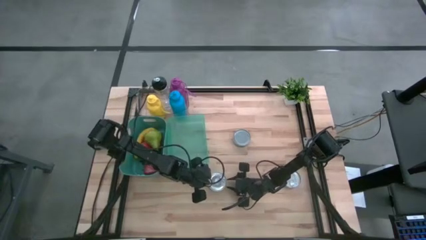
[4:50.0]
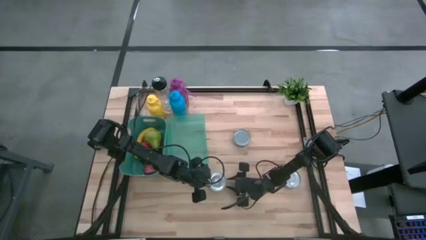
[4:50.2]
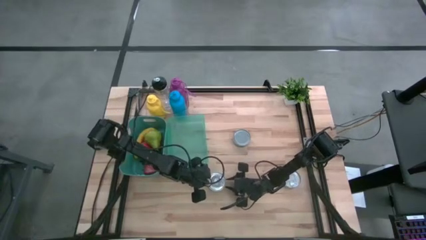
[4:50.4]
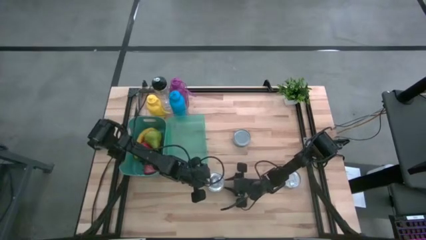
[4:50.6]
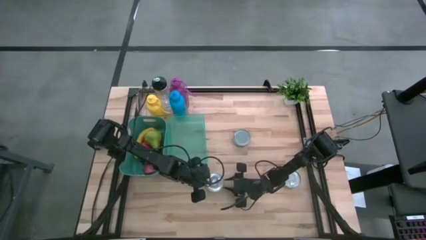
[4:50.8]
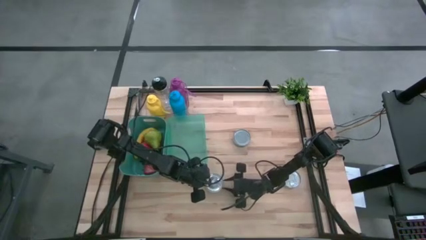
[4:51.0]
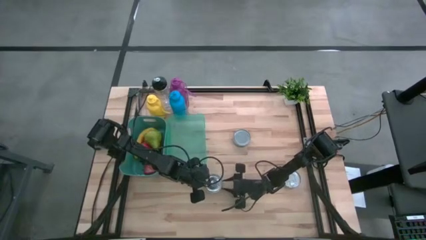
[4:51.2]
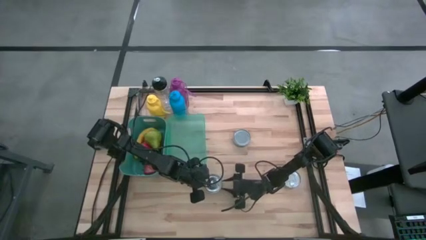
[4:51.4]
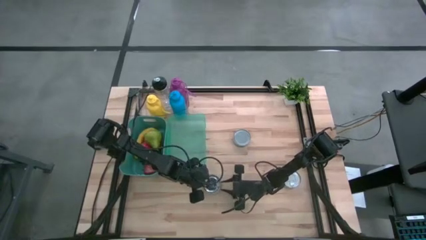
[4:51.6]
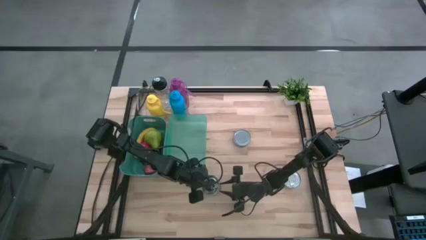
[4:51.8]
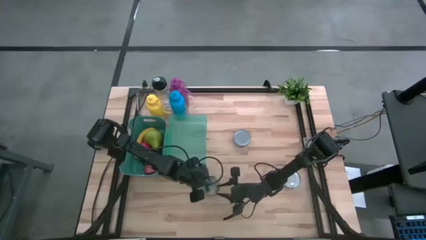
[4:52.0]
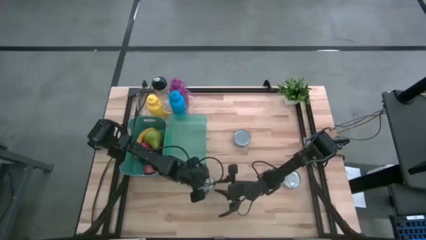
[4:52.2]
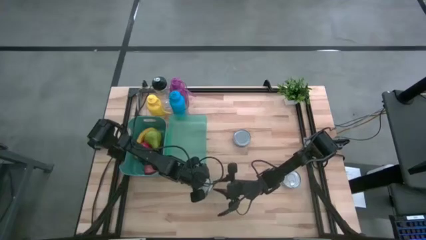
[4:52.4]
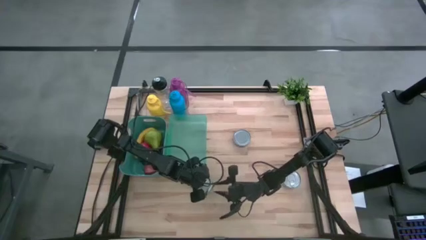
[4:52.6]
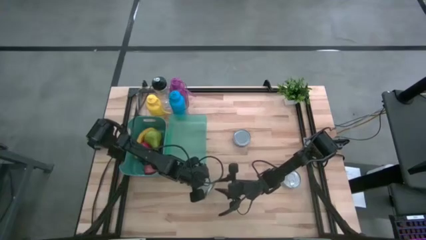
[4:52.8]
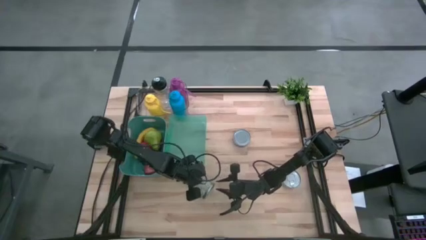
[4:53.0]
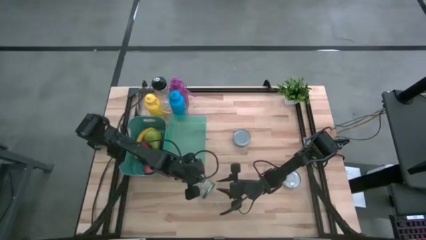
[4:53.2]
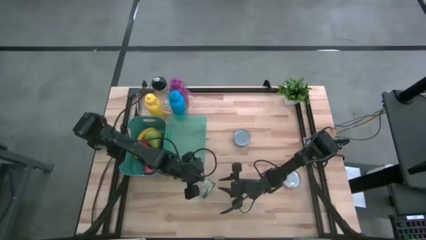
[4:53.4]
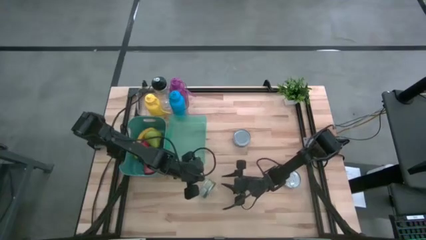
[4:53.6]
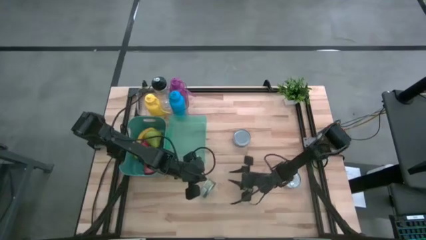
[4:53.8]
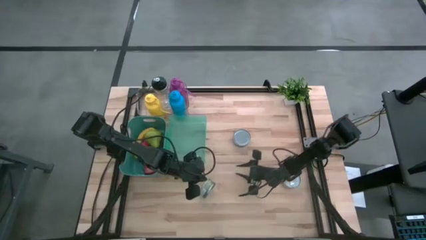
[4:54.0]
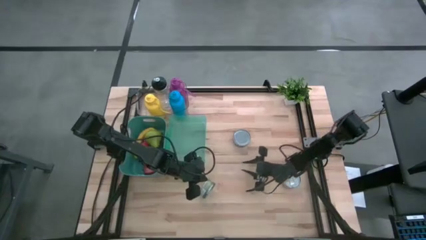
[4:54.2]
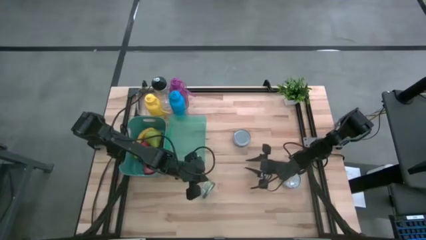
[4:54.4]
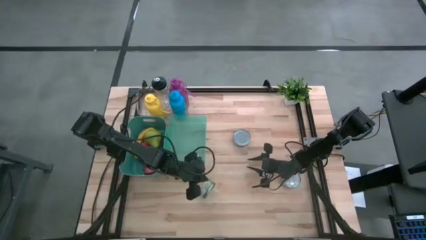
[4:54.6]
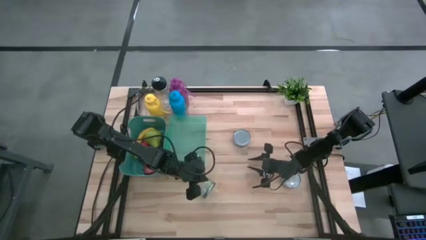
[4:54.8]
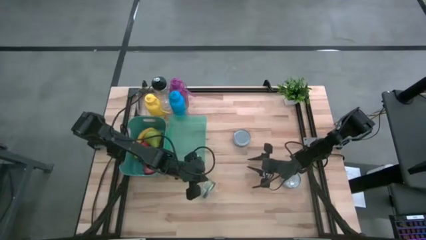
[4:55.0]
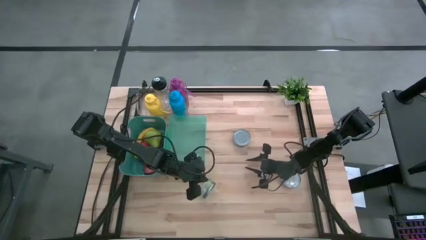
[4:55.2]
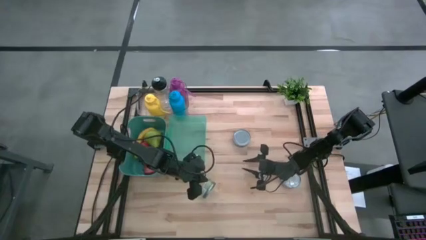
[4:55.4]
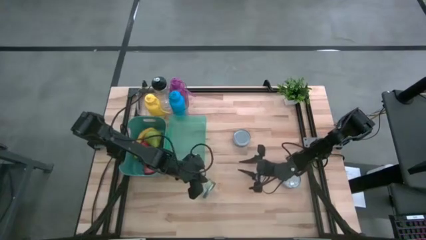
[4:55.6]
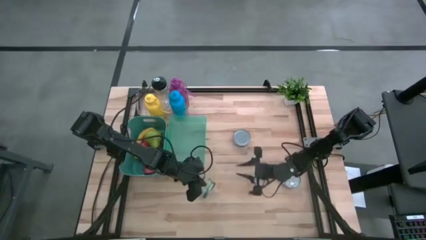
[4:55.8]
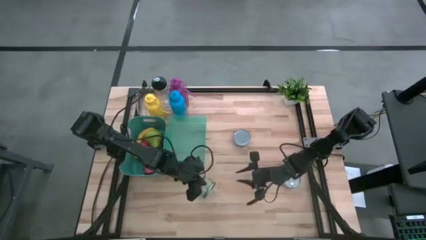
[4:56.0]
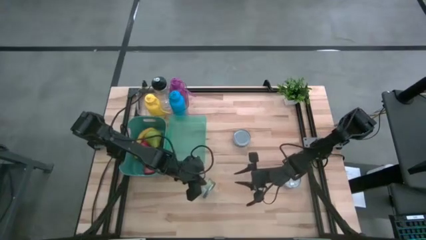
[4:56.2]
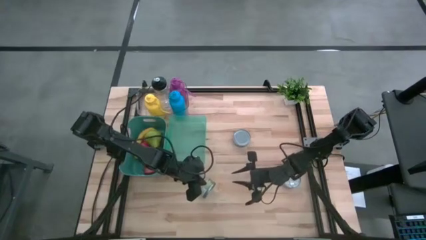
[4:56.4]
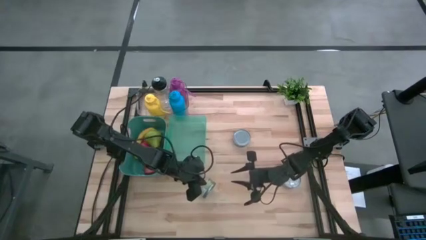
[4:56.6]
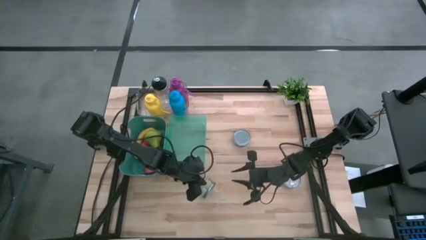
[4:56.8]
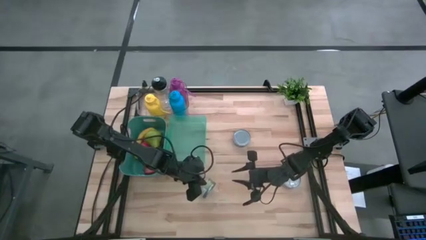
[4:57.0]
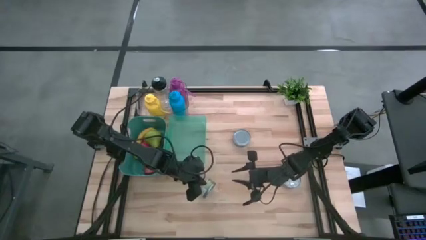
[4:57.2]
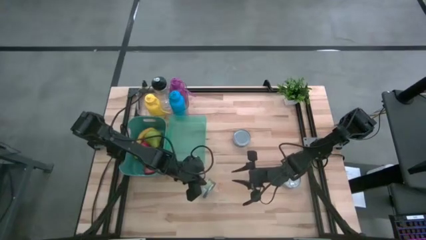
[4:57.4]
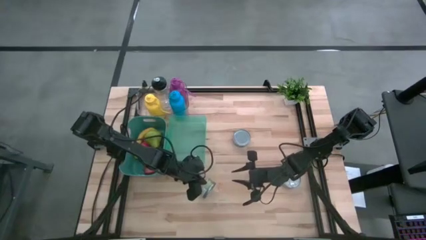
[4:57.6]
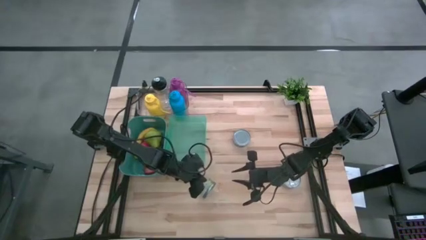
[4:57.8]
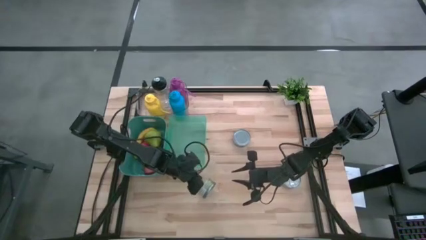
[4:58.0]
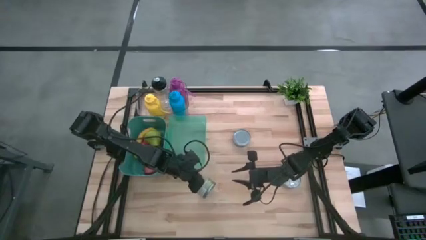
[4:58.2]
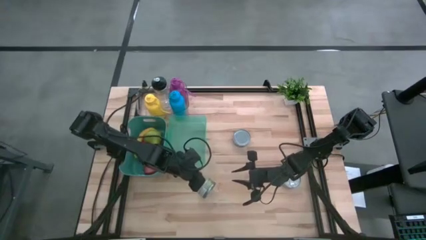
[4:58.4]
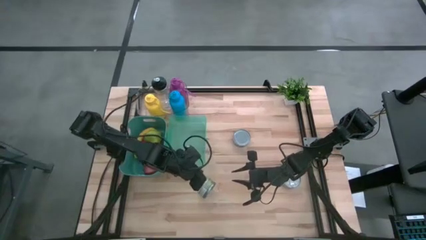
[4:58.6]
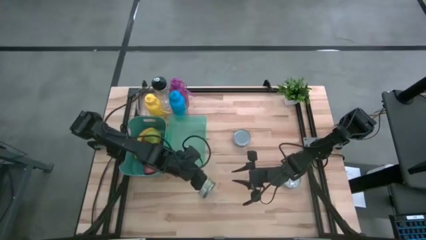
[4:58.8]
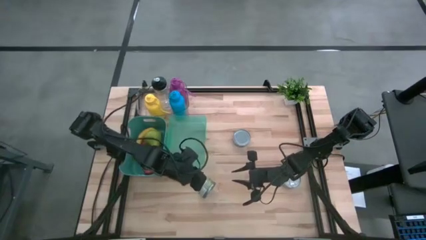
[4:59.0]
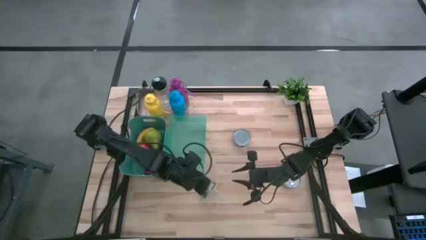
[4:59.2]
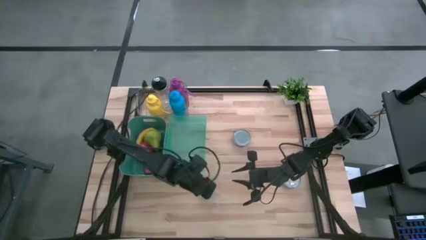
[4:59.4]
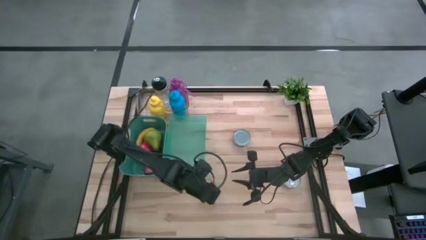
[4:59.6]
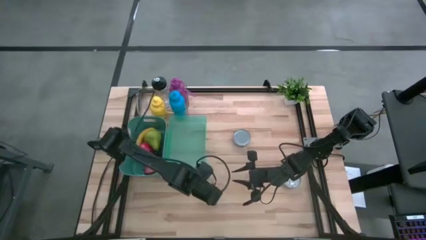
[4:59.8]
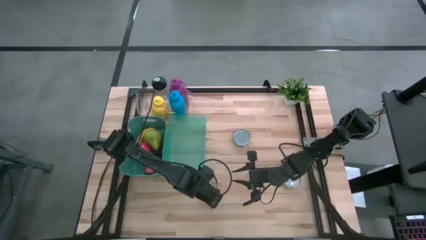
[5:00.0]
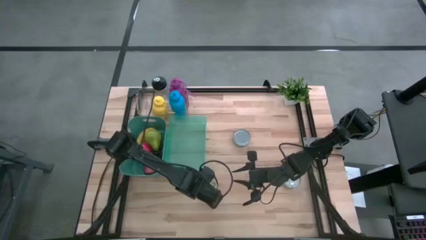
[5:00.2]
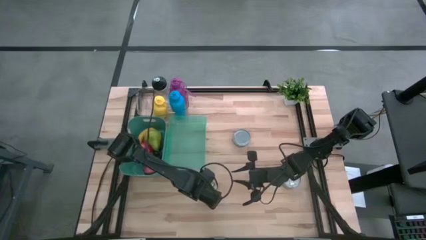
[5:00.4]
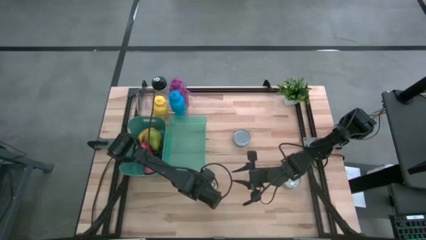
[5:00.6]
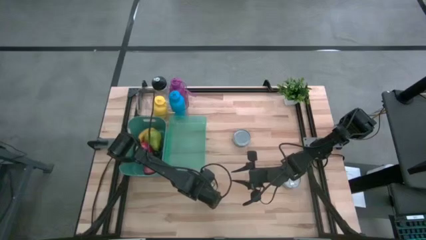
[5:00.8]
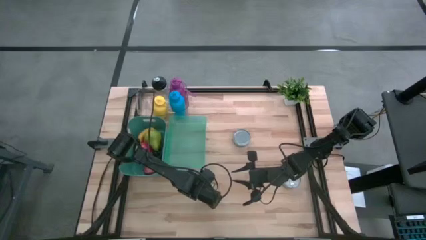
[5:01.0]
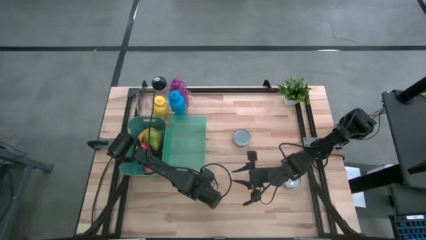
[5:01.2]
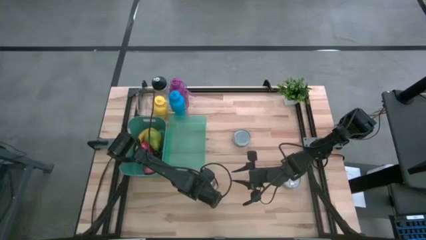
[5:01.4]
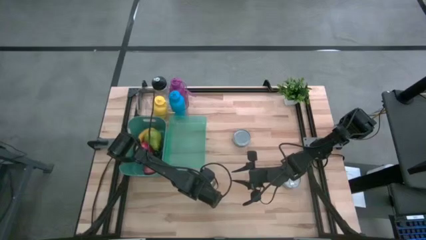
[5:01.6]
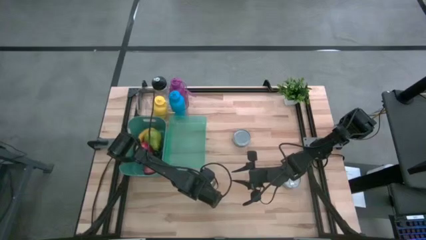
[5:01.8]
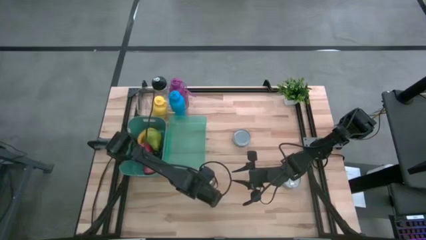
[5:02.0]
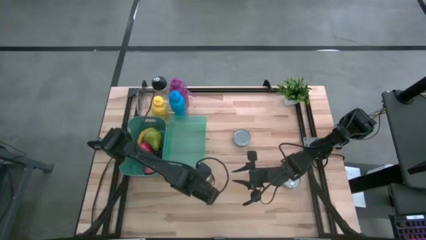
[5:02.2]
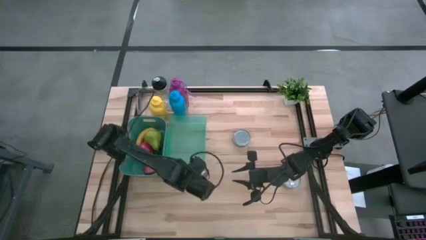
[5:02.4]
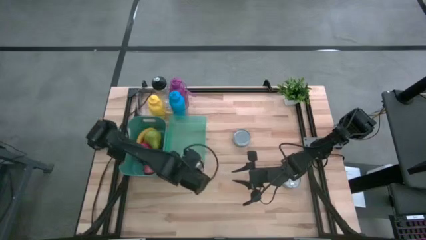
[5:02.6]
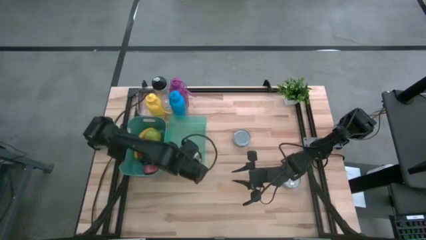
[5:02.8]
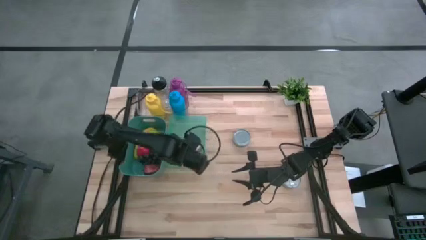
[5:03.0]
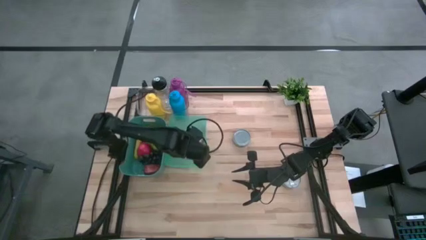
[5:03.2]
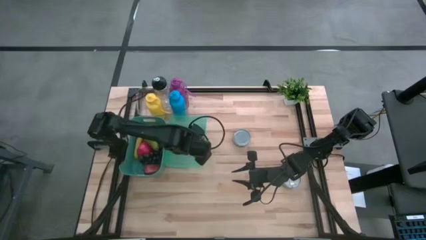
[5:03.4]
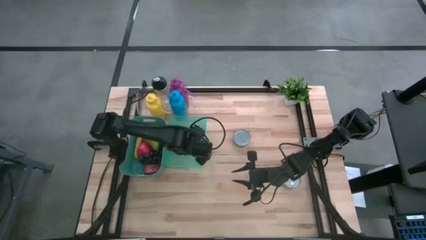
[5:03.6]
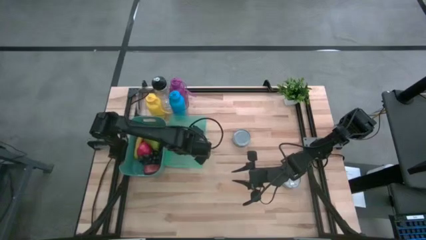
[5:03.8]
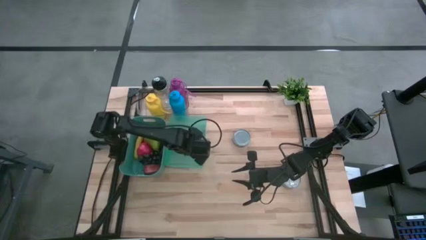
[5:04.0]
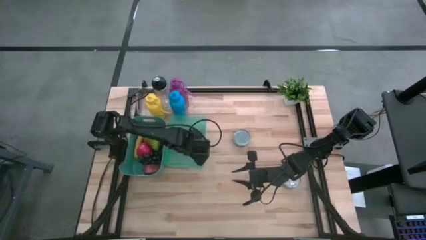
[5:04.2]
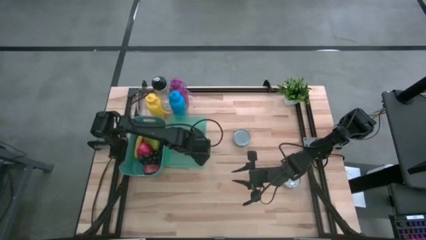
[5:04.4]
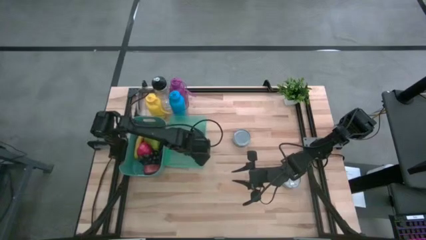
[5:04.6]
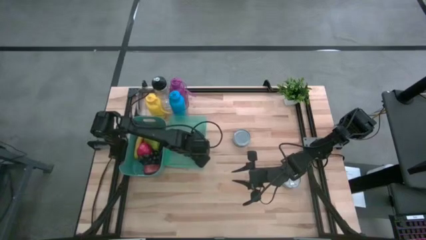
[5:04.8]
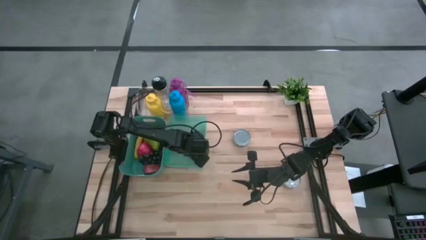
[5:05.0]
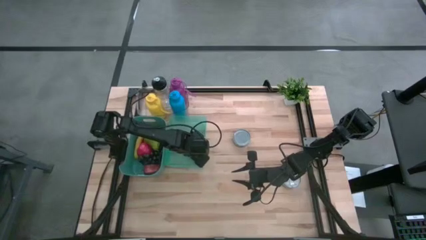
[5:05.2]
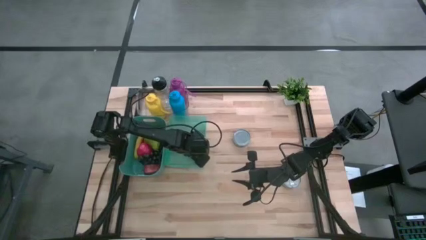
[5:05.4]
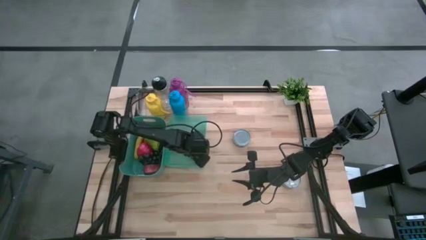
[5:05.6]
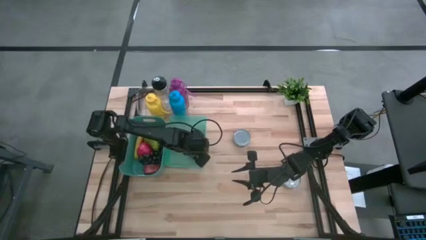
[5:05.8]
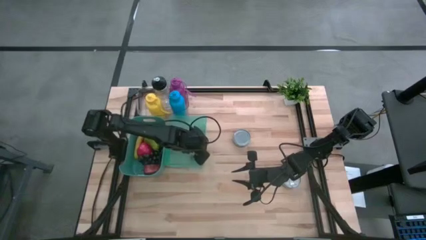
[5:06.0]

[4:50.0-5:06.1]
Task: Pick & Place Food Item
Put the bottom green tuna can into the light green bin
